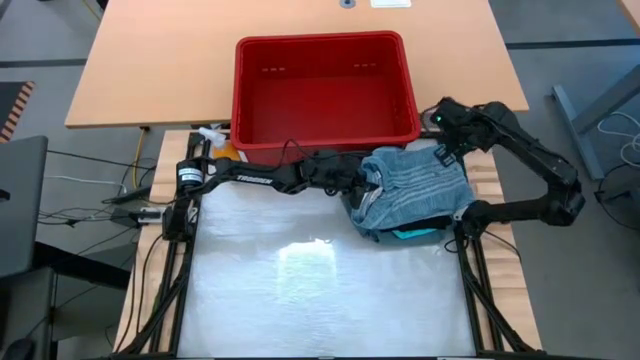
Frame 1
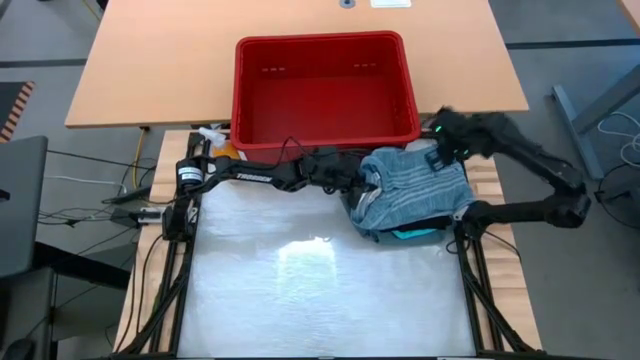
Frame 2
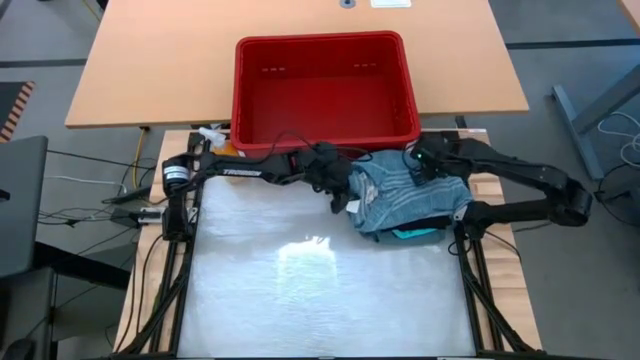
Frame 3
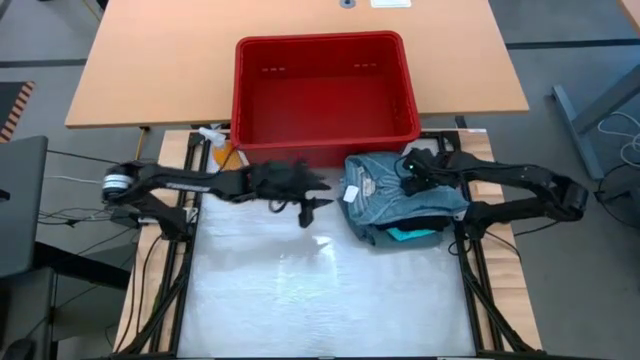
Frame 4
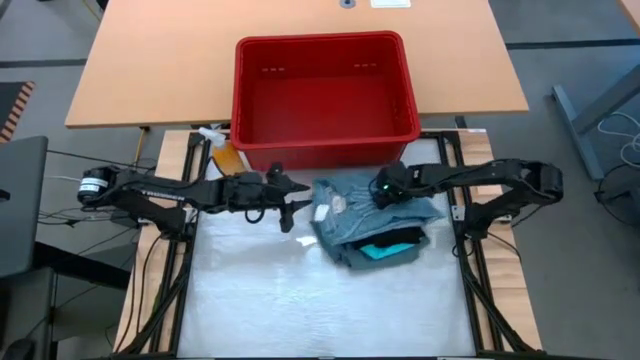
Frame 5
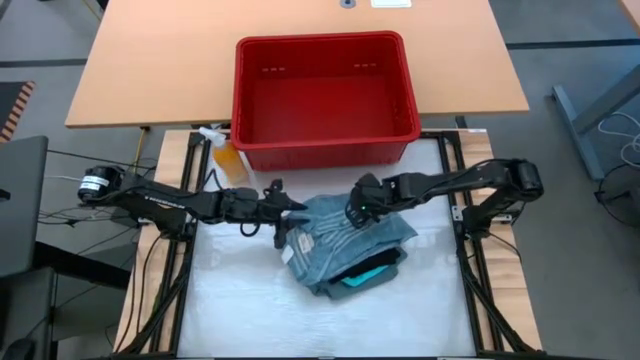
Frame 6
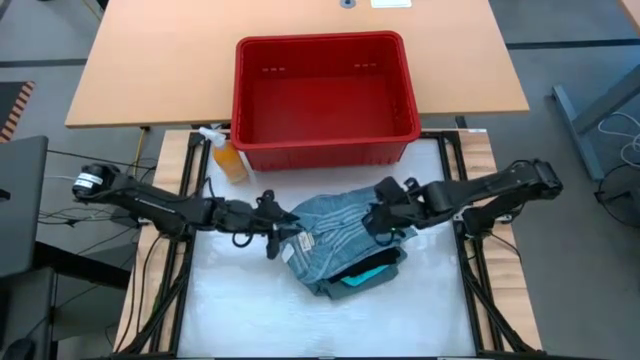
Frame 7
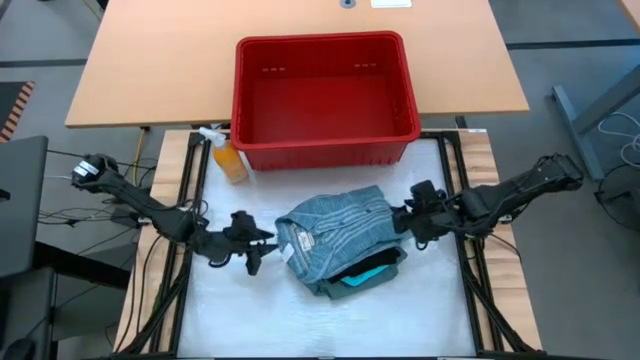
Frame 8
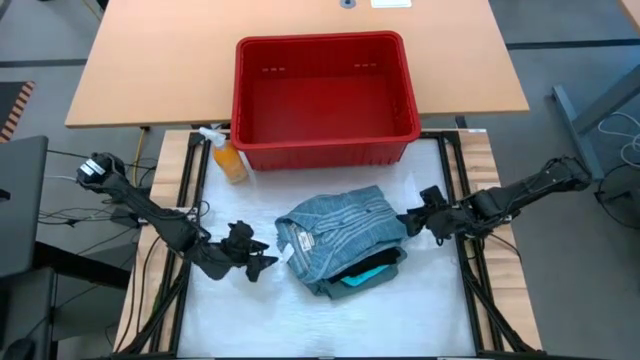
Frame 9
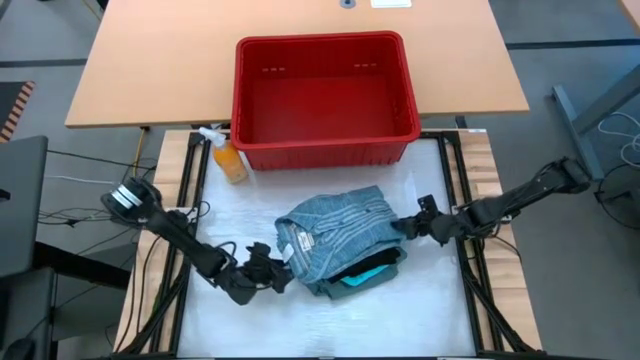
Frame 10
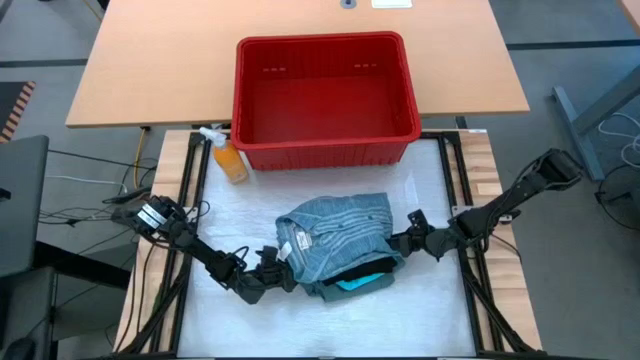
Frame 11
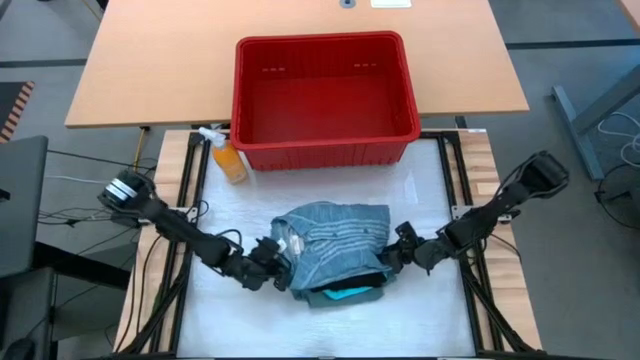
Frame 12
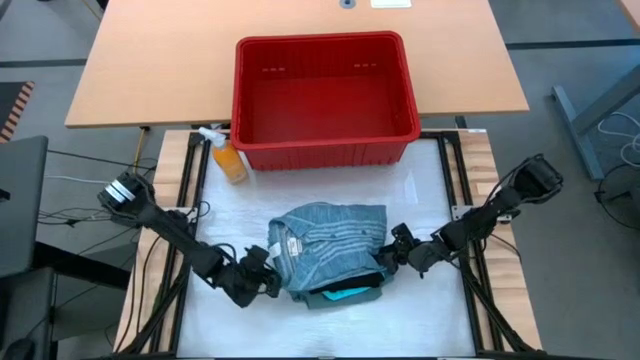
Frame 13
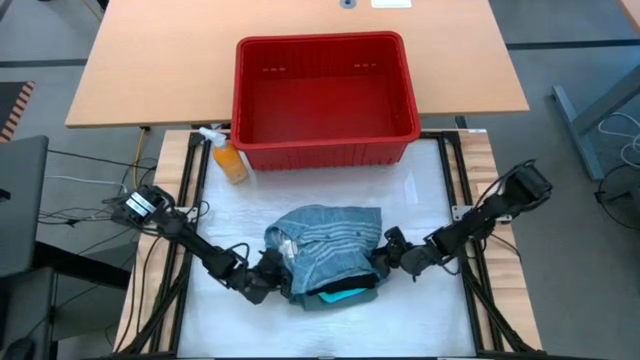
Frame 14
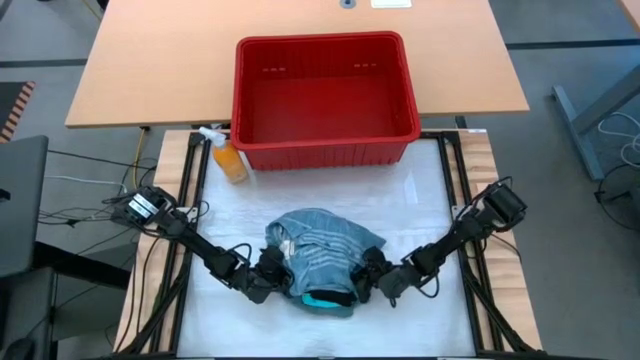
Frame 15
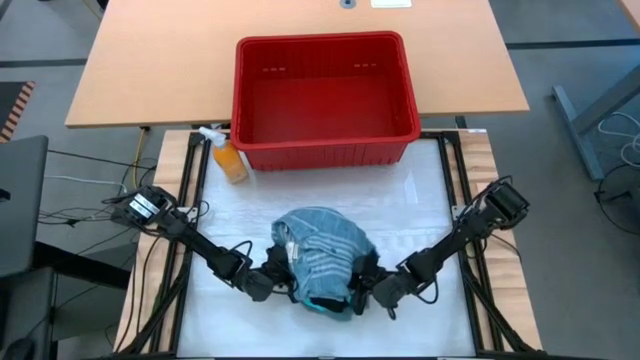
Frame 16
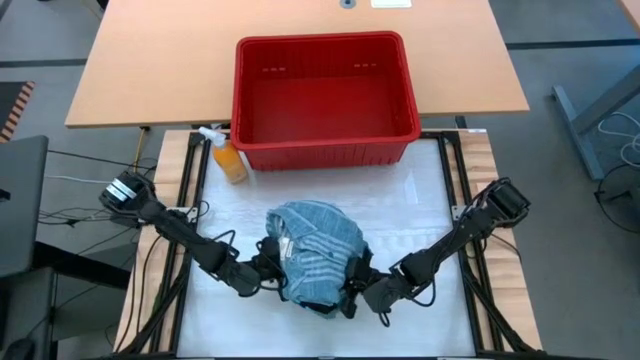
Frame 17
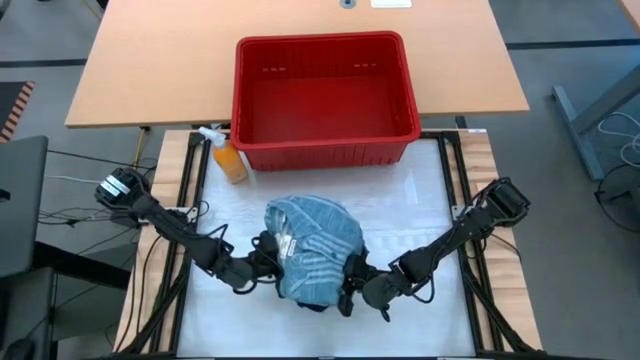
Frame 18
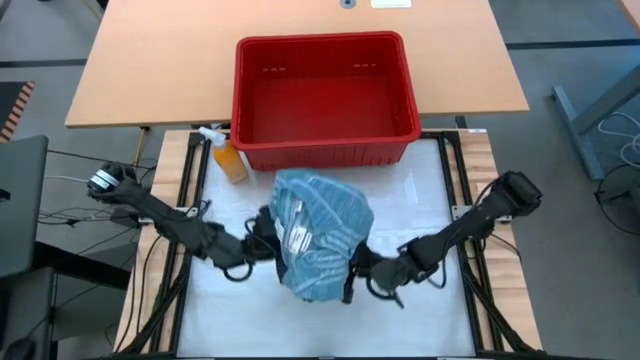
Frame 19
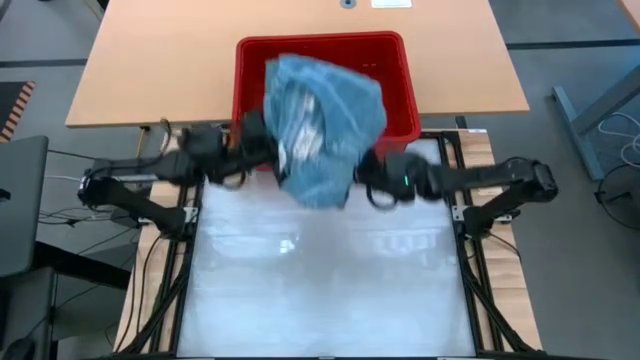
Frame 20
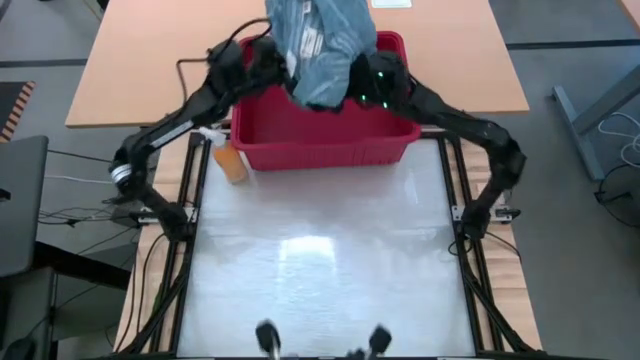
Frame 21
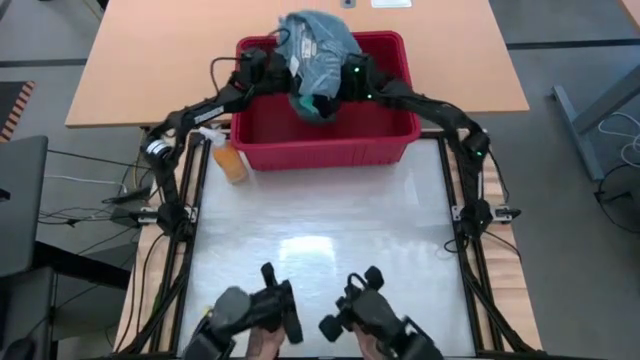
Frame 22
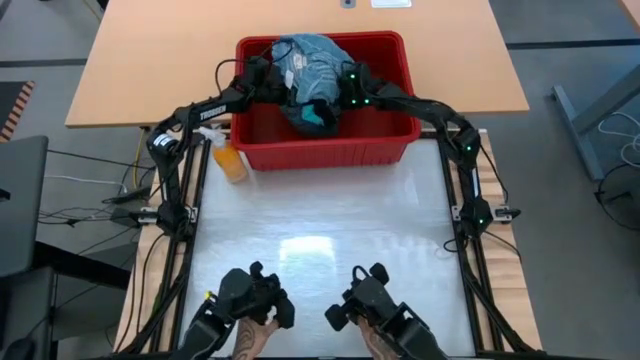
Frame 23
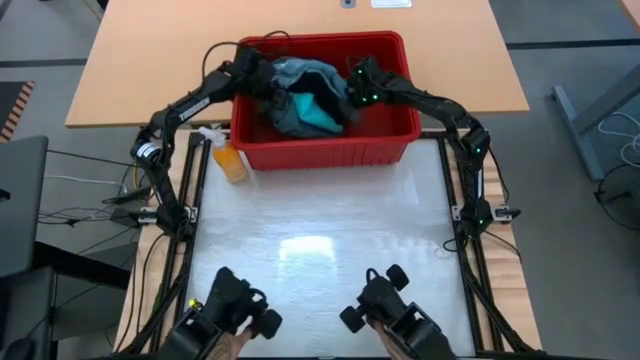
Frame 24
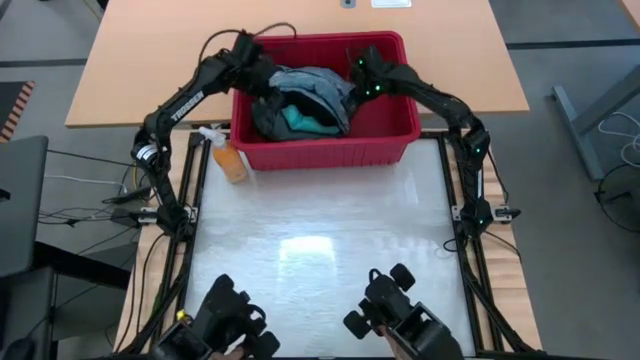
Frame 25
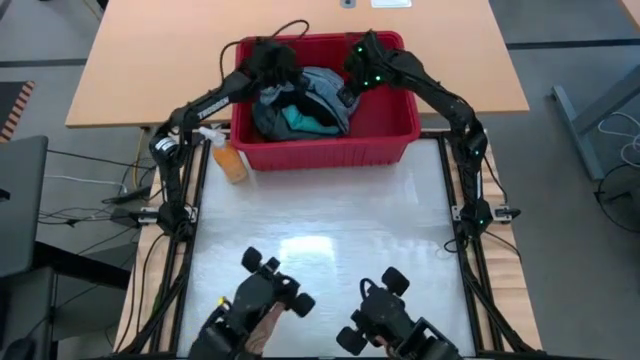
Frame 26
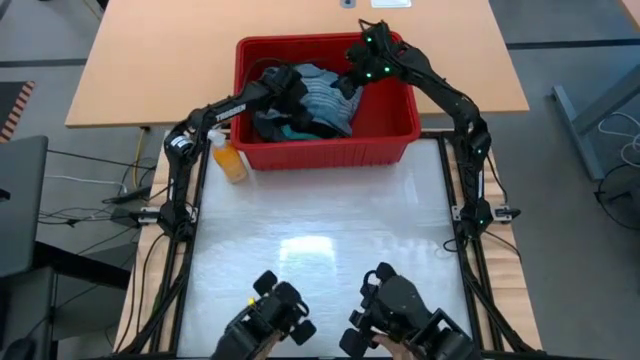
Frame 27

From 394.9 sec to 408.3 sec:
Task: Fold Laundry from Bin
Put the folded clothes into the red bin

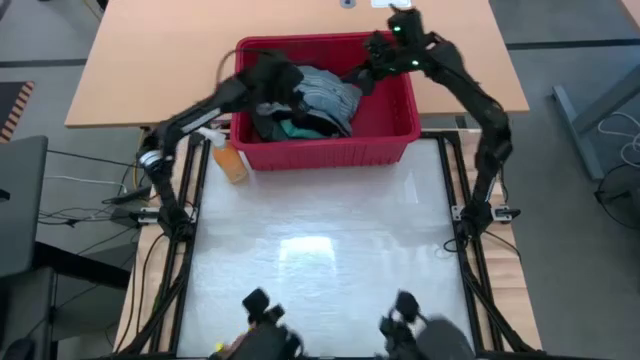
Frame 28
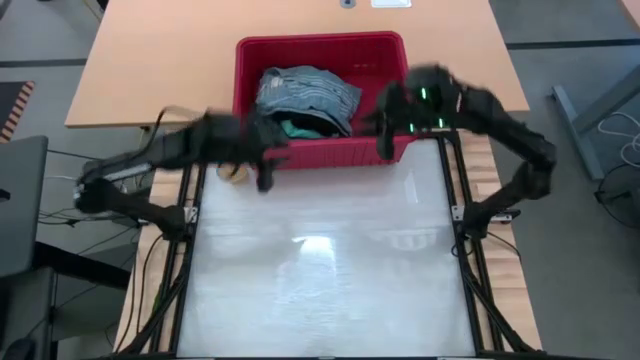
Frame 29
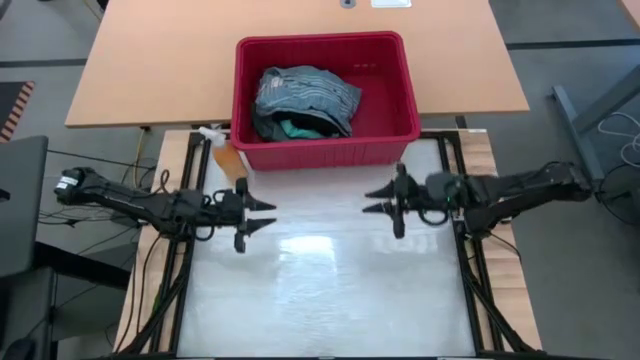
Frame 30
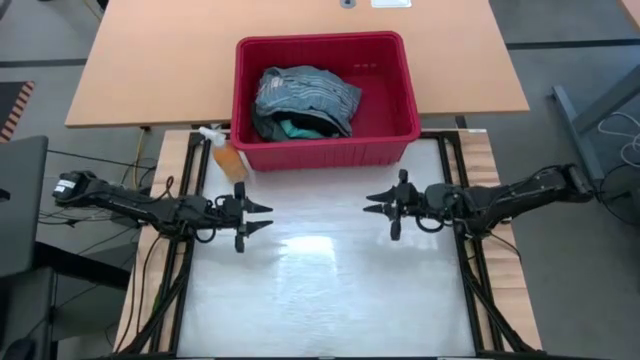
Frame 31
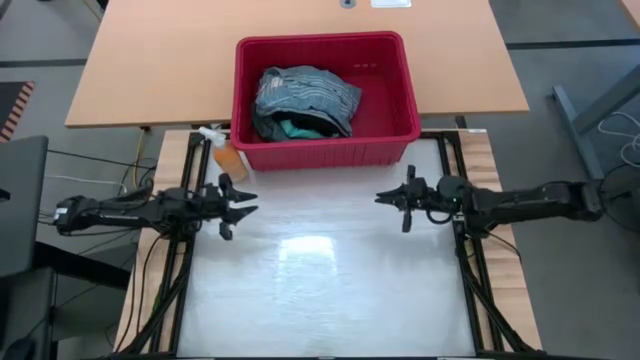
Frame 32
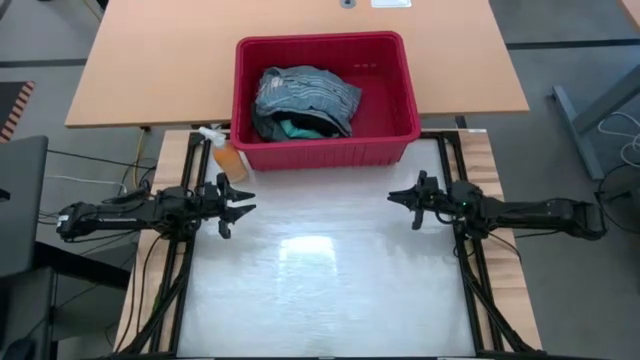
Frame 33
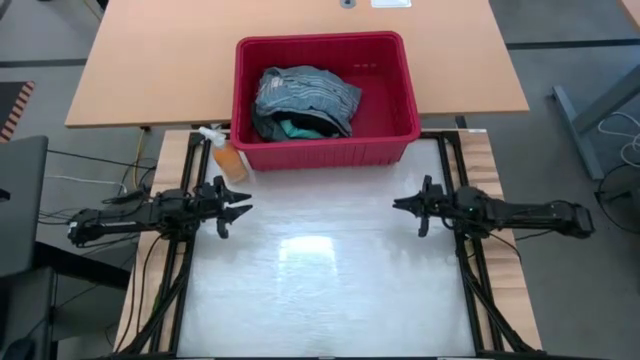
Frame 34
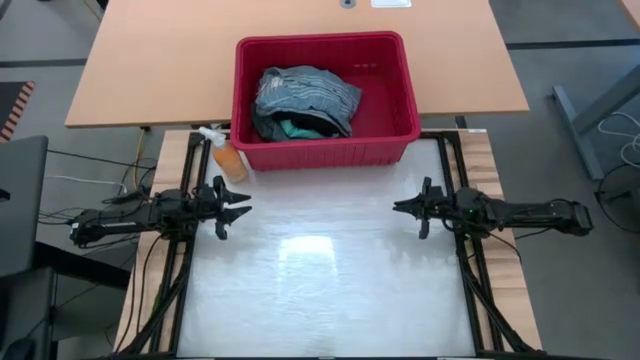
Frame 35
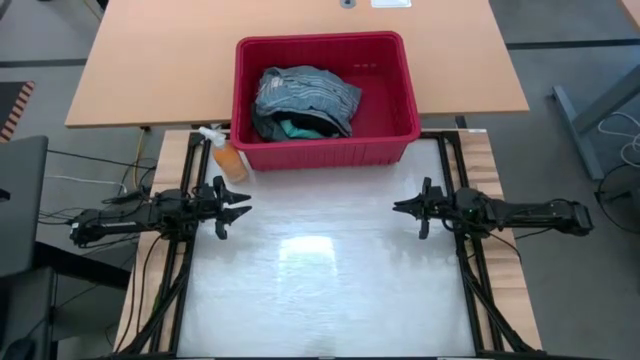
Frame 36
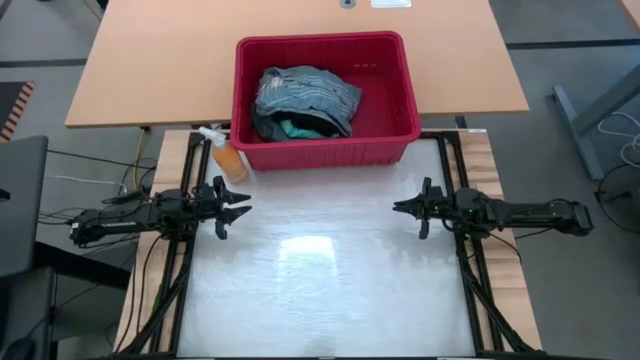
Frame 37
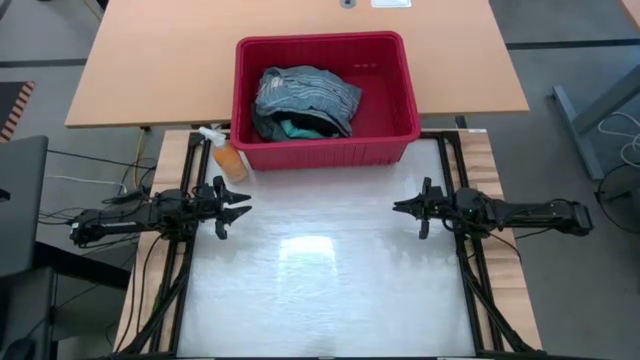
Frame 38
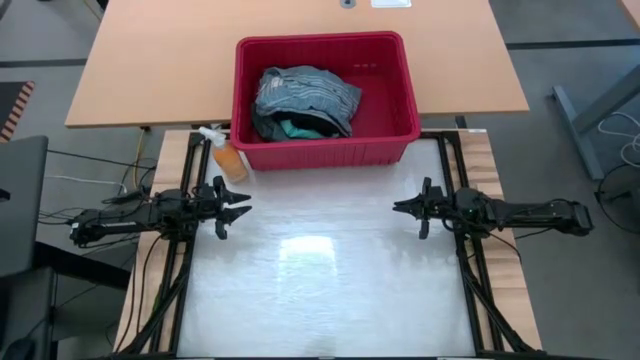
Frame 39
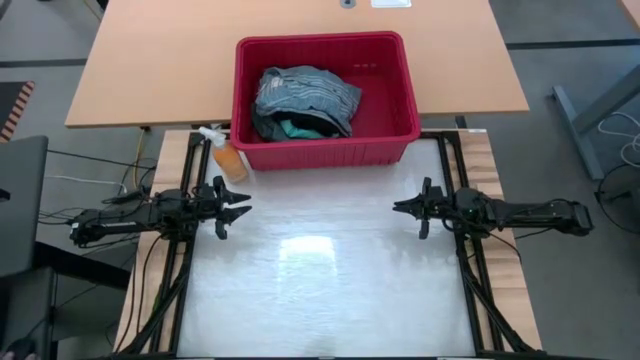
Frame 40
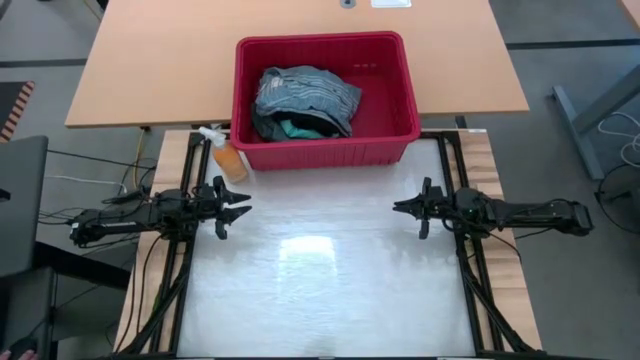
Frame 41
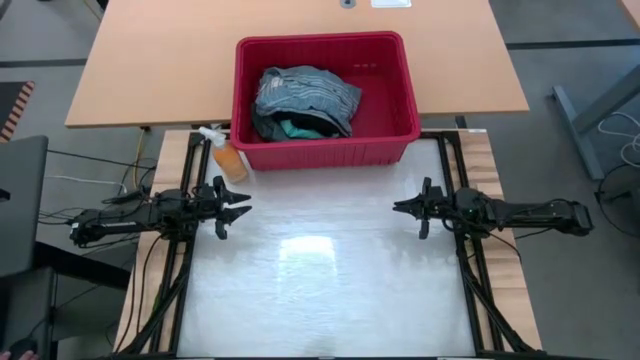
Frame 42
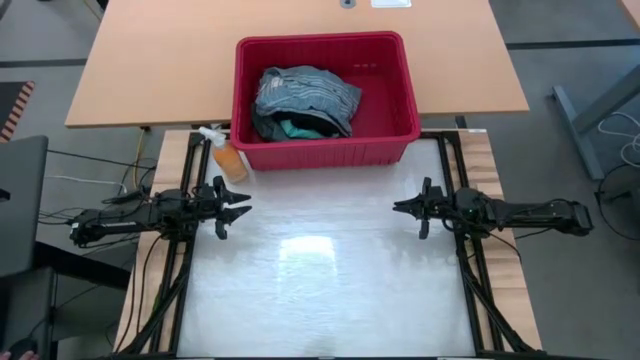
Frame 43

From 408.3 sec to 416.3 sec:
Return to Home Position
